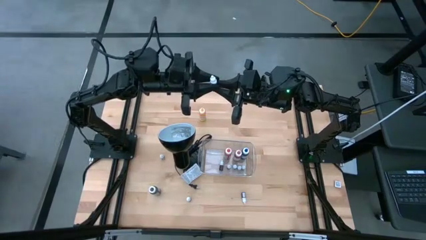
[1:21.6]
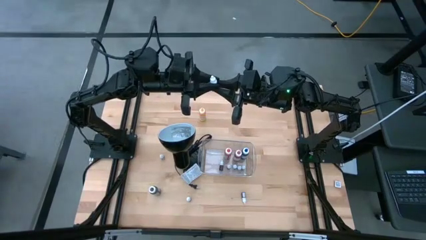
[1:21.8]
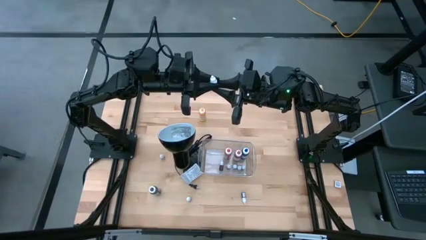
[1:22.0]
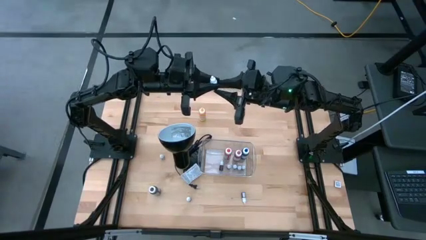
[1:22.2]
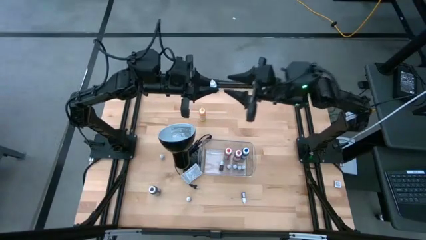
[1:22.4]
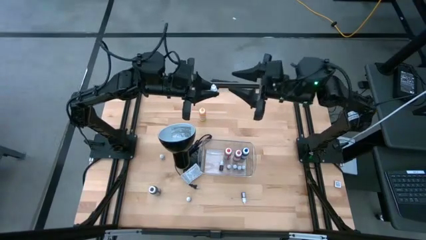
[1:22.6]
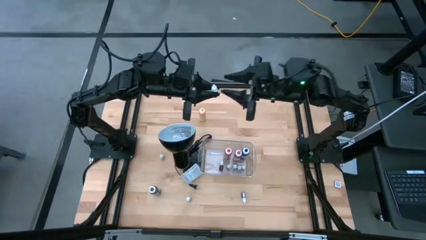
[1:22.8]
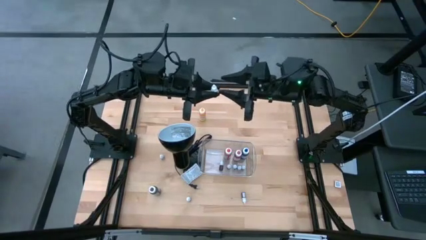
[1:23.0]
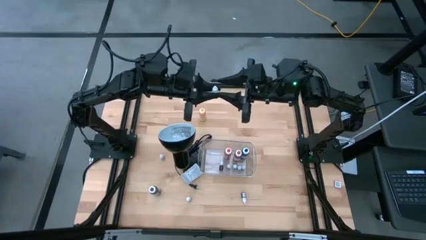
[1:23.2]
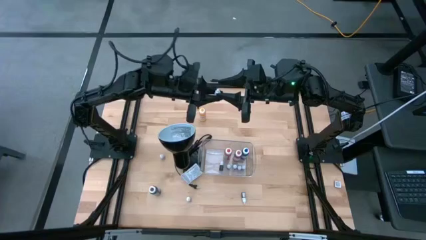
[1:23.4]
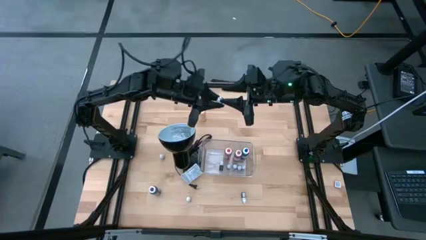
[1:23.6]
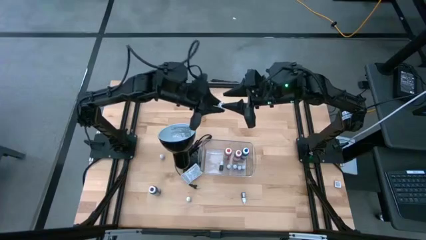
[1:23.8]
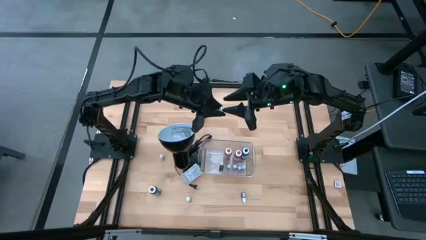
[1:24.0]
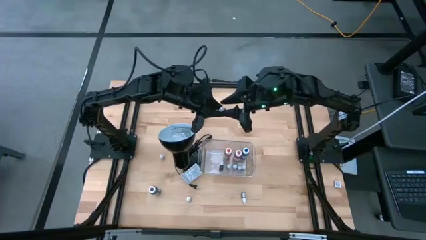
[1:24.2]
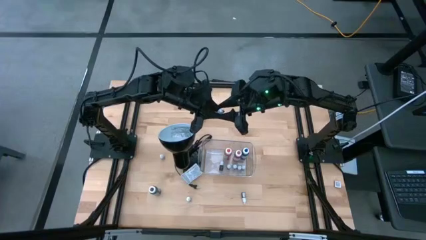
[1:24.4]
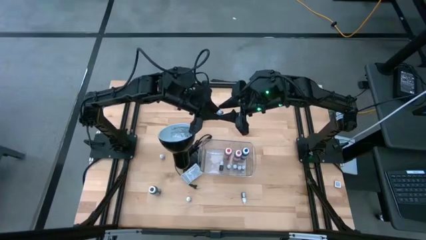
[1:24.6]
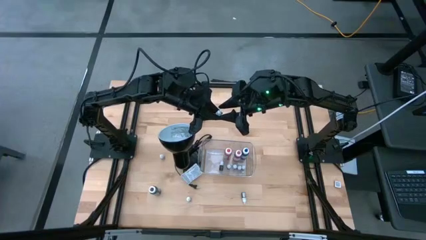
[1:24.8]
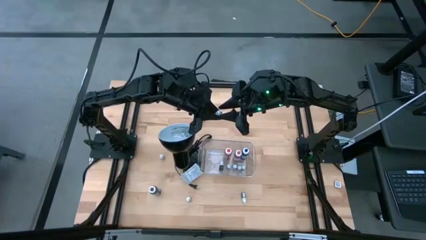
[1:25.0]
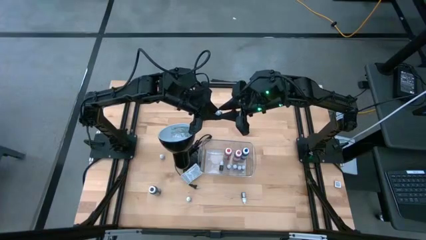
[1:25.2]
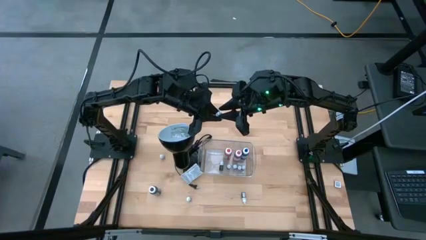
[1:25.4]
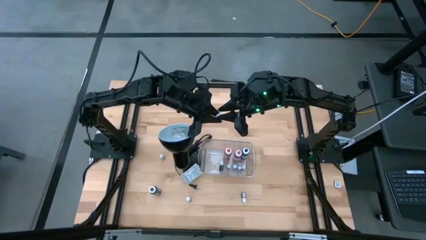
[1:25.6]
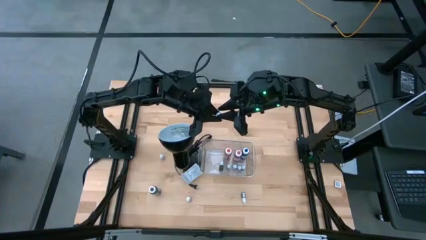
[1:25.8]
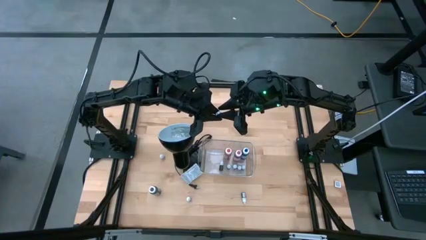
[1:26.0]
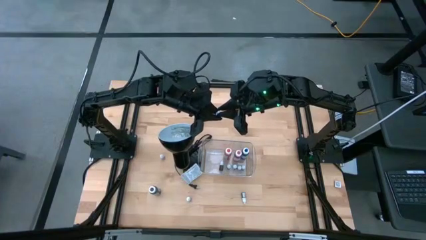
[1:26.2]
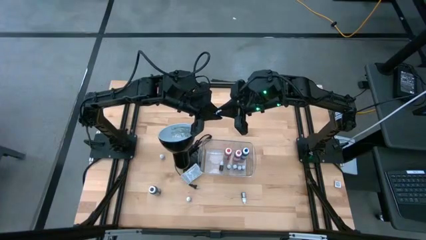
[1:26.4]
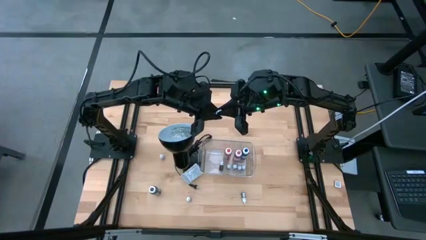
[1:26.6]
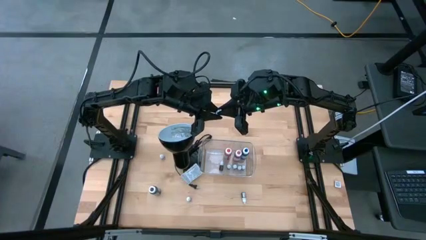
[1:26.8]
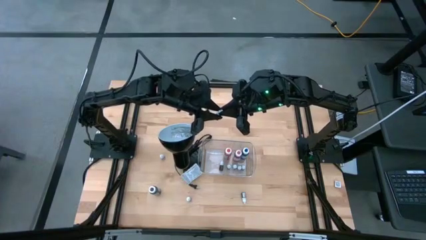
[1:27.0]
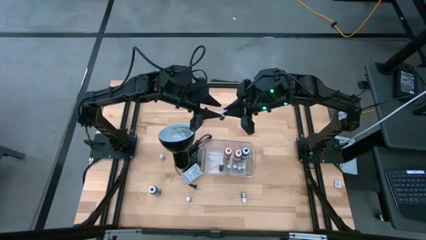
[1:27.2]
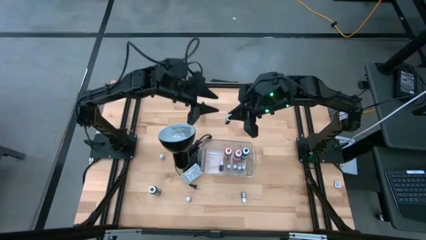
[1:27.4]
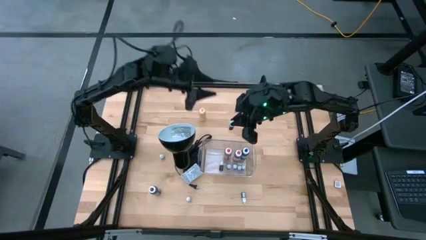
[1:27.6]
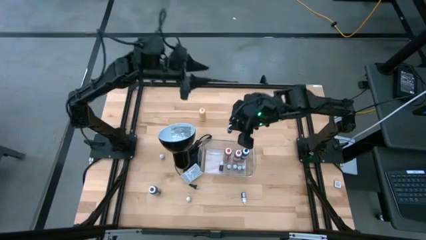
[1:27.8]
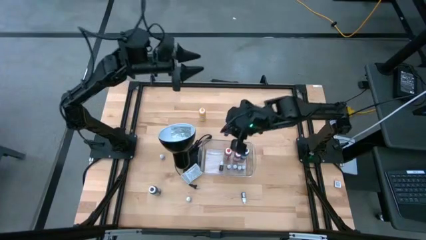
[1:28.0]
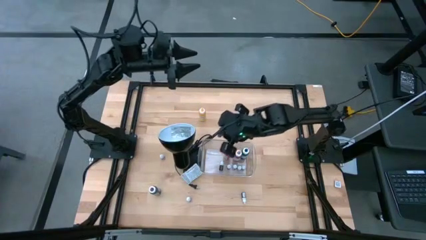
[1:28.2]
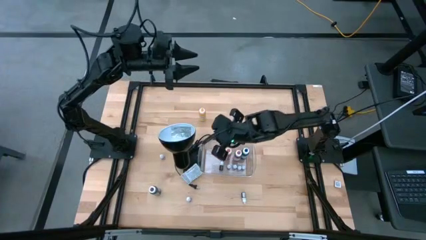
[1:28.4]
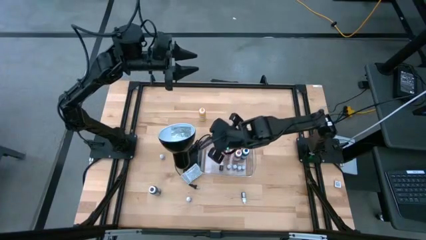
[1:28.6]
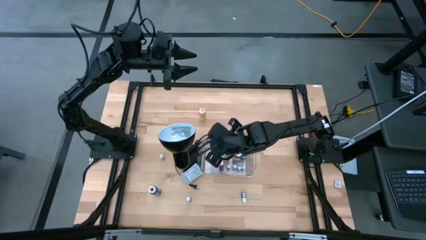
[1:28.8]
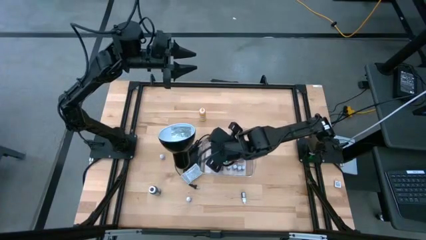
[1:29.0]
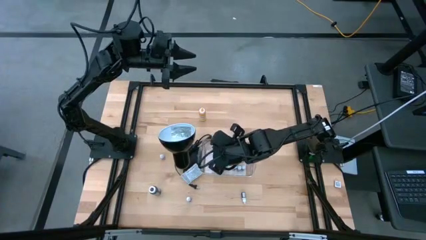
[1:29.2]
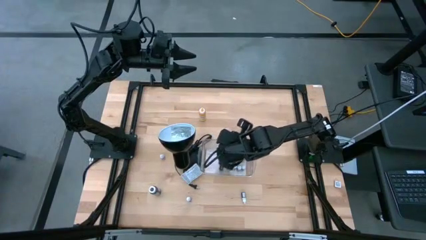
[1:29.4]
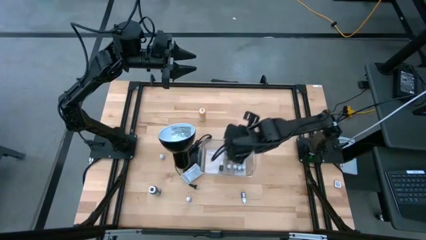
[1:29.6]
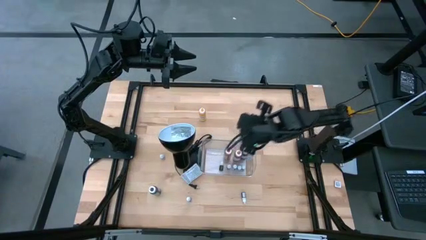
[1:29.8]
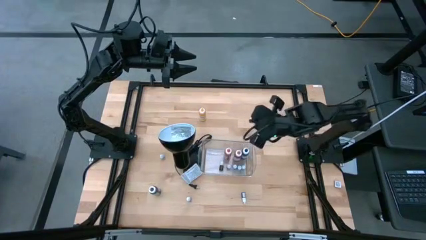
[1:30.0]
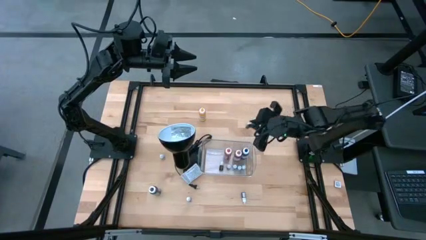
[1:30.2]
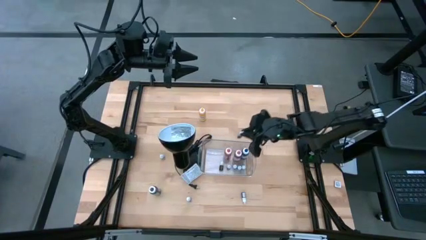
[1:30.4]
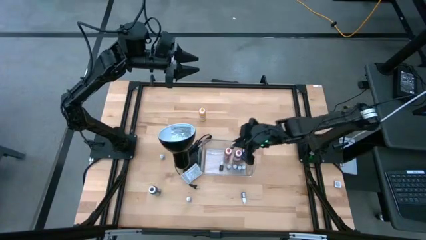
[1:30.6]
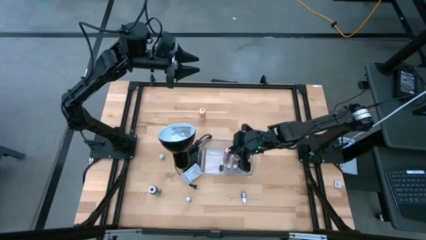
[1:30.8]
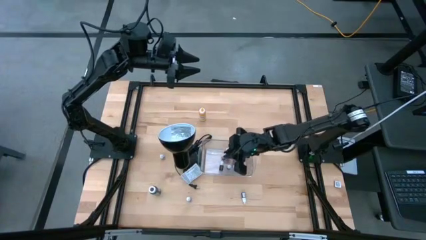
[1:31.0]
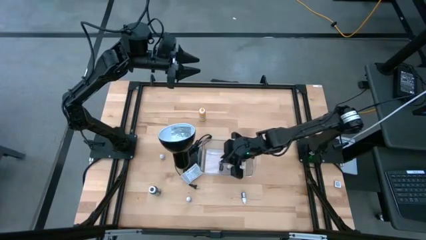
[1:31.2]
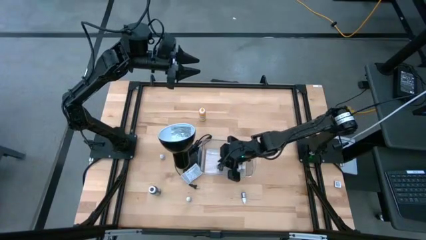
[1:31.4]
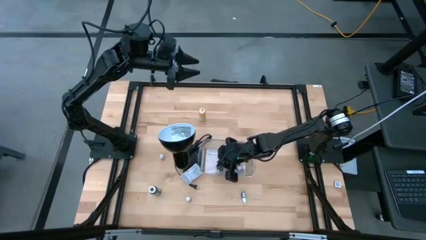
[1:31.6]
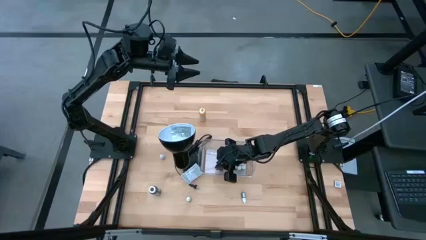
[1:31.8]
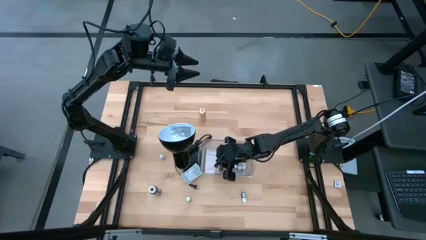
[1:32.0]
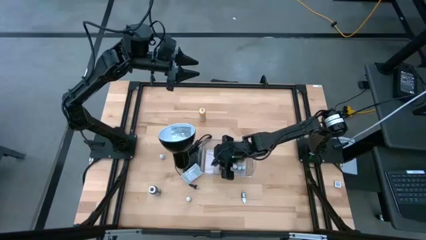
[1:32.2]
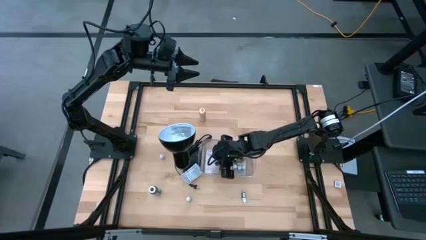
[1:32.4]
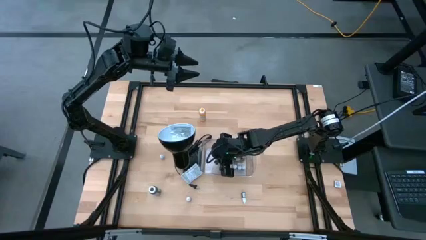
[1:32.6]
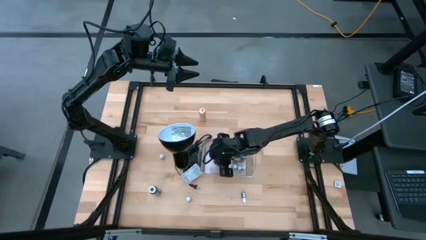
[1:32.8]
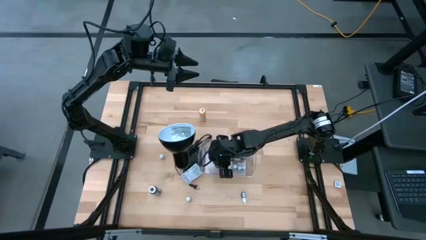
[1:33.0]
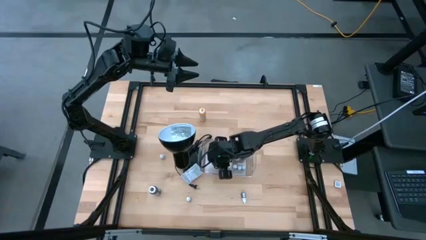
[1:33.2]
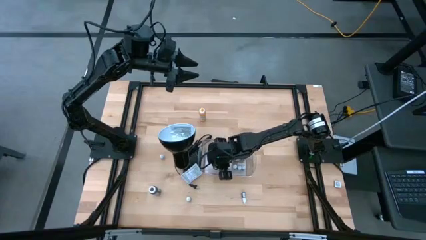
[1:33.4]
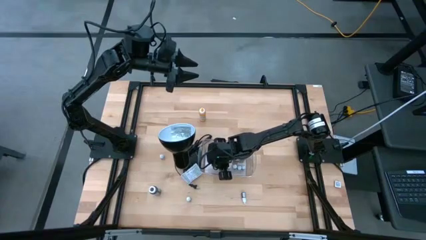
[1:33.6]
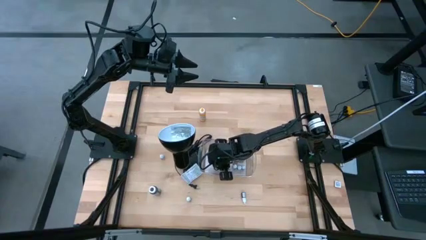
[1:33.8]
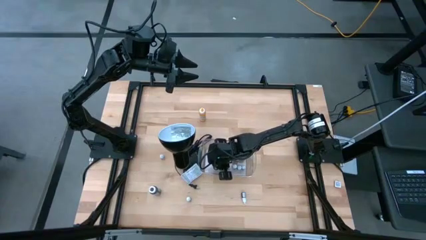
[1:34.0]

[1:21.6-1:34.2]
Task: Pick & Place food coloring
Put the small black food coloring bottle into the transparent bin
